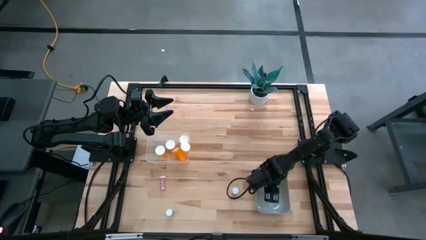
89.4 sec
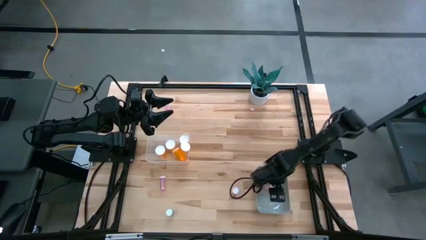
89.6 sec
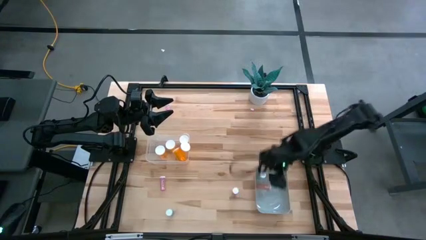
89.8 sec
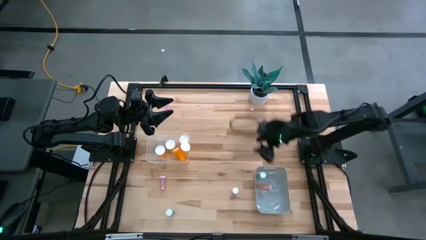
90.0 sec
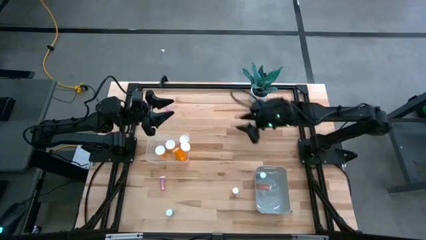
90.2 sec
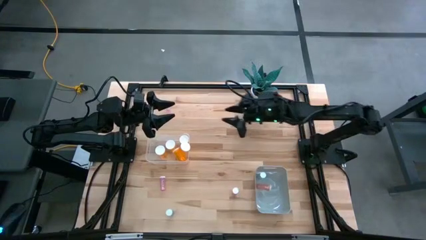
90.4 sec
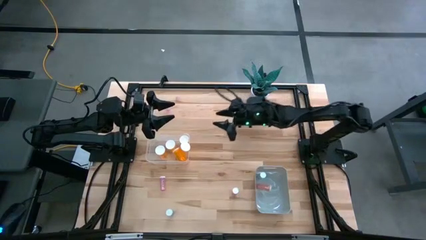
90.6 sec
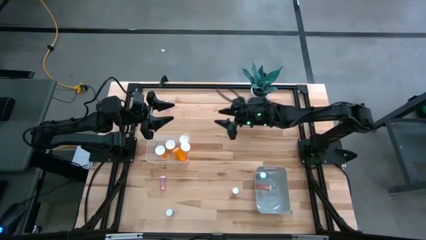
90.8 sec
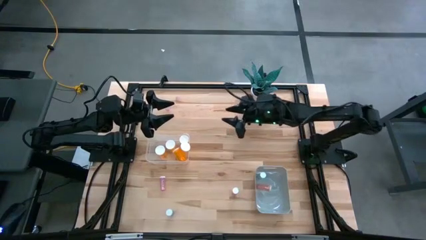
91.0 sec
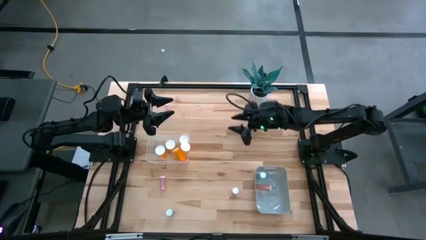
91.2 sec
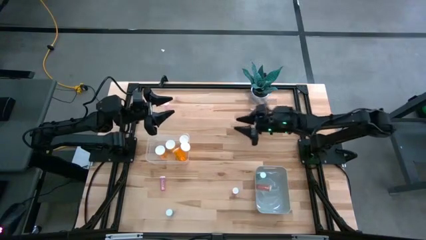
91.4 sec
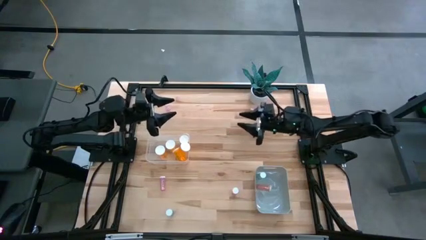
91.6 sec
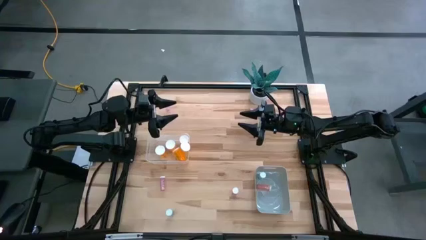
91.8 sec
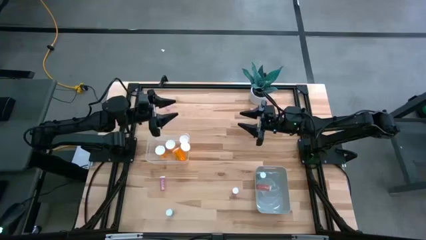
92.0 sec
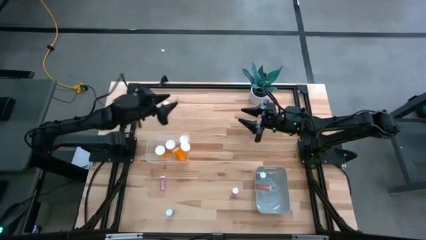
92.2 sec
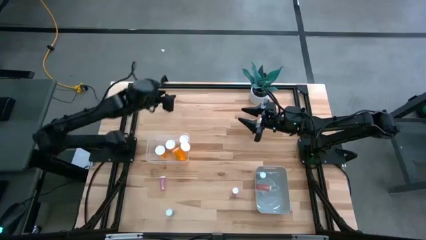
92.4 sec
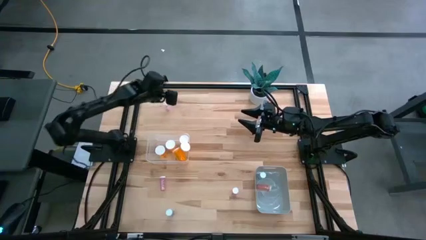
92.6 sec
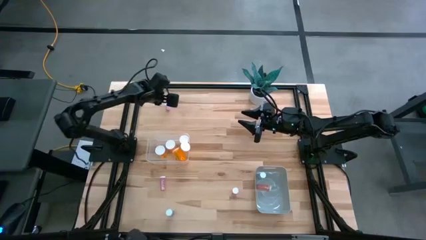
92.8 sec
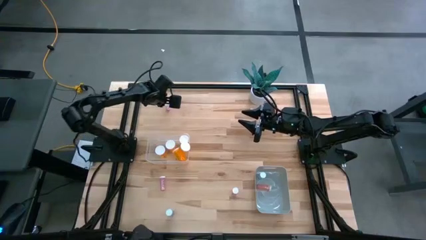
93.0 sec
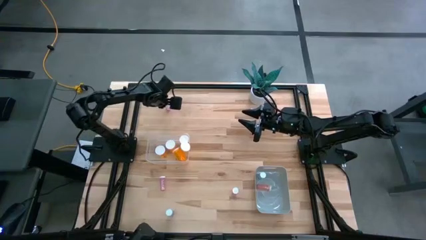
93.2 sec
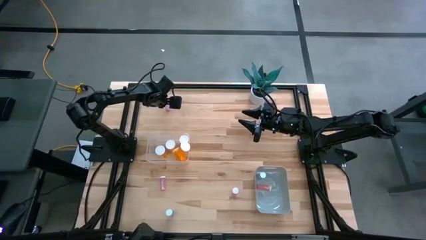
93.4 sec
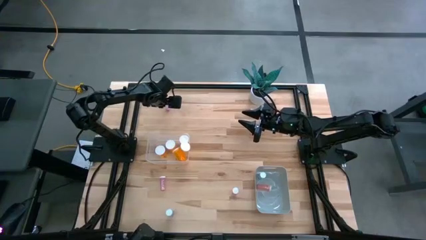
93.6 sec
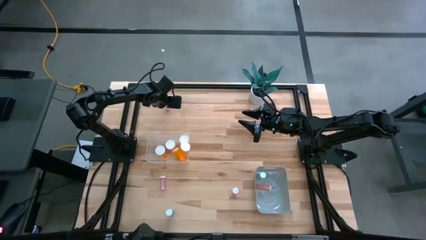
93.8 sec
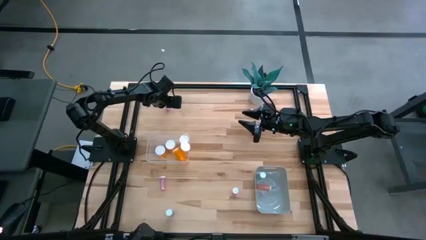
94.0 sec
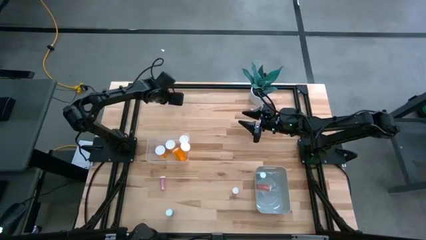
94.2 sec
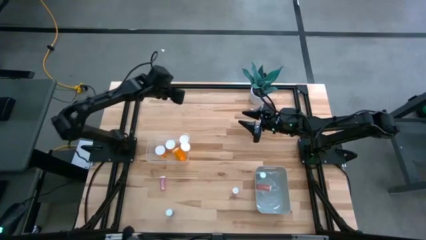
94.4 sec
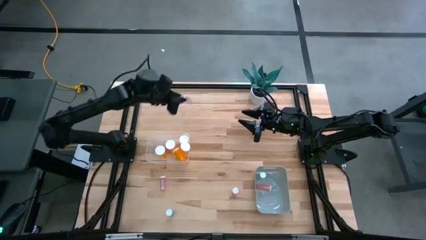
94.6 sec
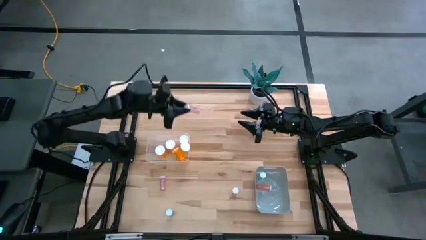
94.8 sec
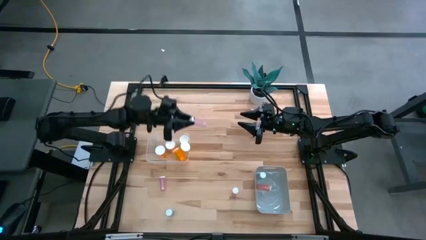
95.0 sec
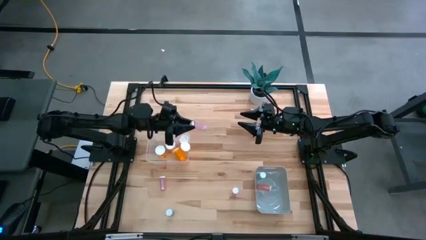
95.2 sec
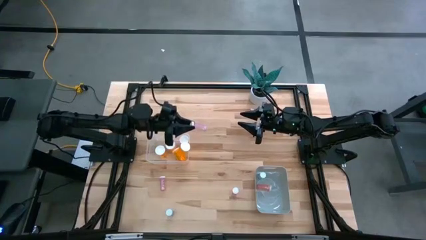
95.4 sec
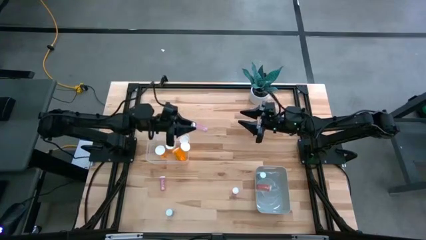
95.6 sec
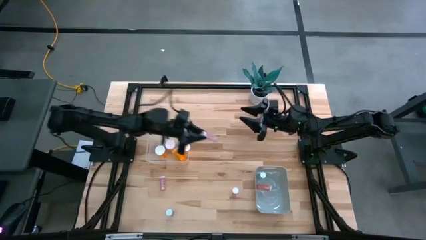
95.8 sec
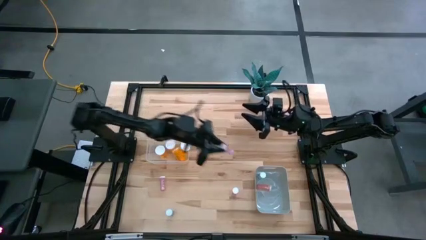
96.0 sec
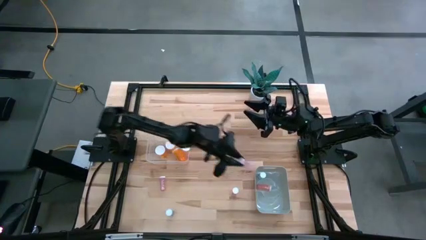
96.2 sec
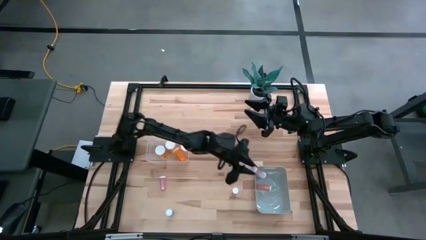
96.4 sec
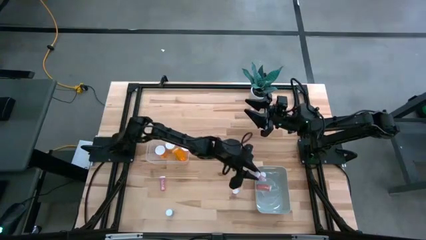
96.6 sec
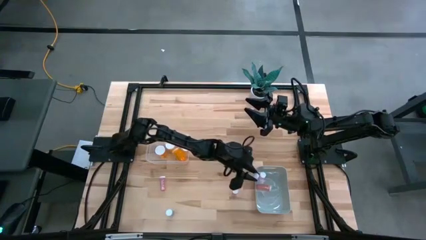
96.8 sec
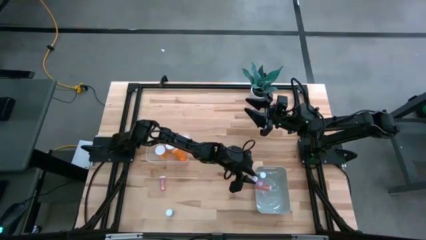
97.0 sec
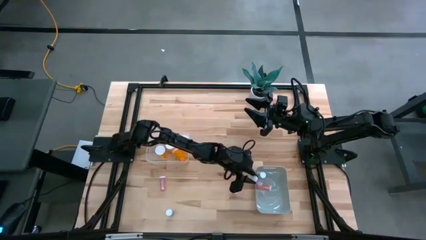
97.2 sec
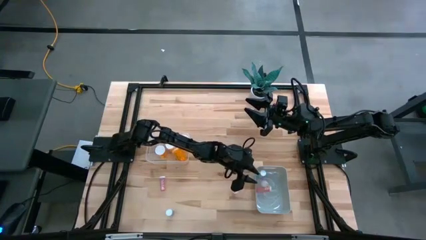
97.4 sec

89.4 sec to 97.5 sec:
Task: Pick and place medicine bottles into bin by pill shape (circle, oval)
Put the small pink pill bottle into the gray bin

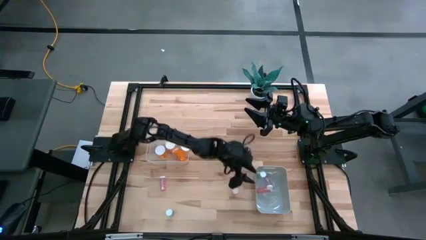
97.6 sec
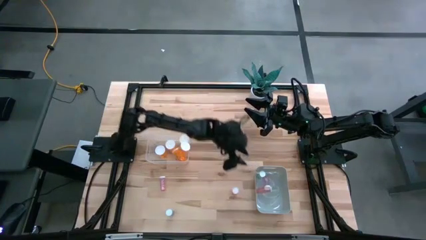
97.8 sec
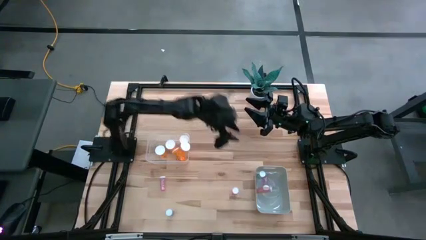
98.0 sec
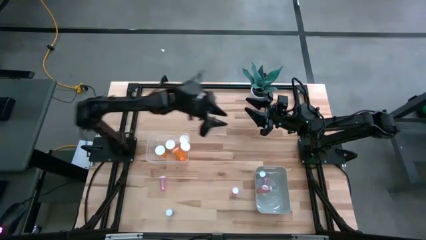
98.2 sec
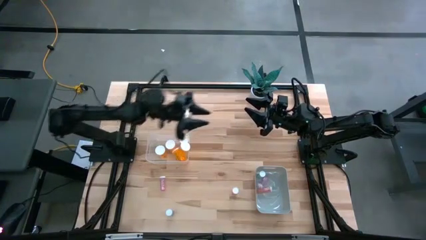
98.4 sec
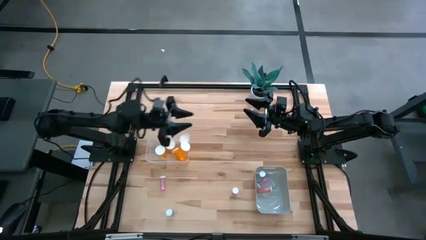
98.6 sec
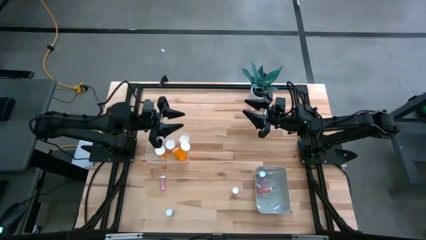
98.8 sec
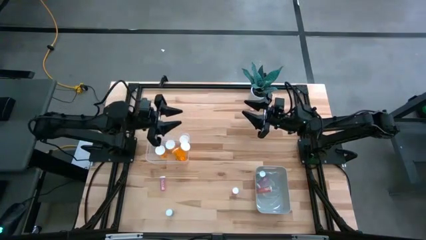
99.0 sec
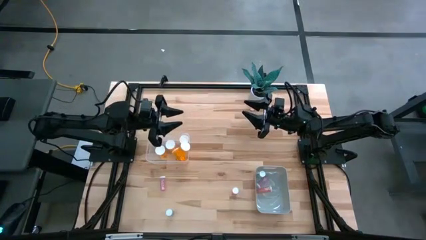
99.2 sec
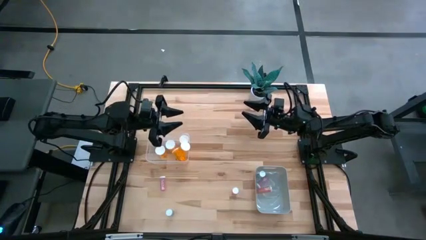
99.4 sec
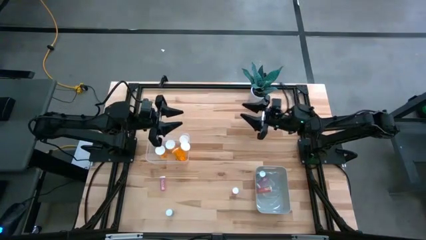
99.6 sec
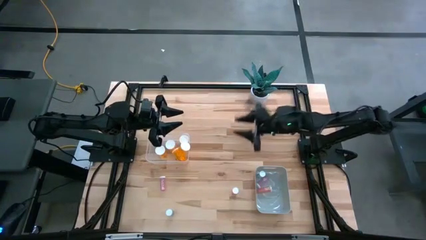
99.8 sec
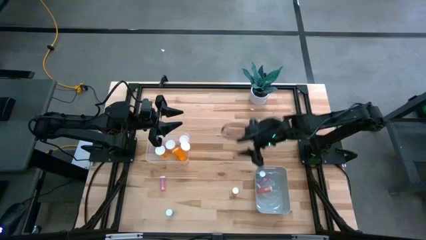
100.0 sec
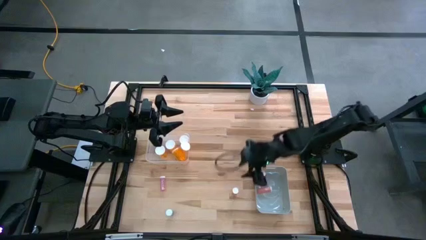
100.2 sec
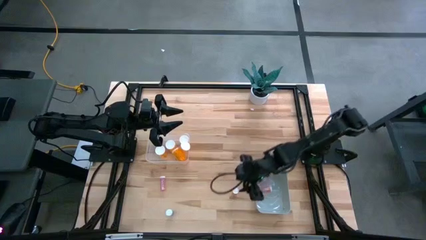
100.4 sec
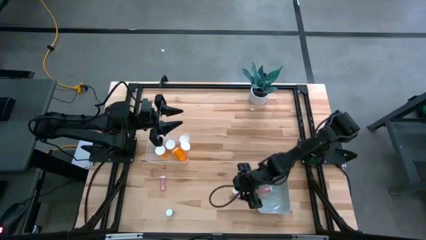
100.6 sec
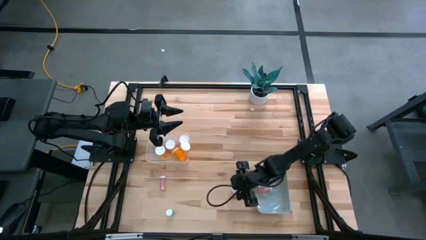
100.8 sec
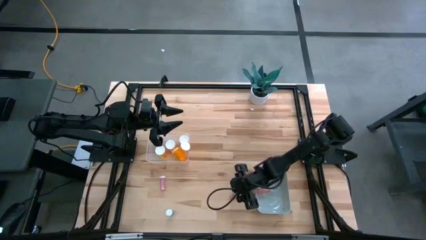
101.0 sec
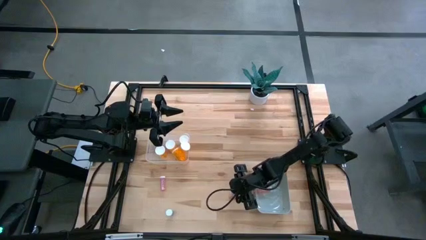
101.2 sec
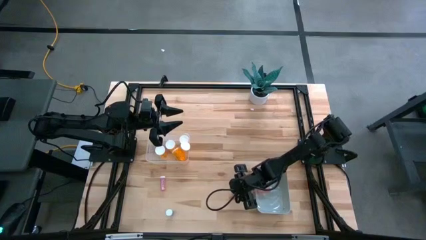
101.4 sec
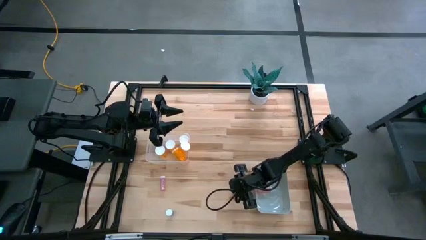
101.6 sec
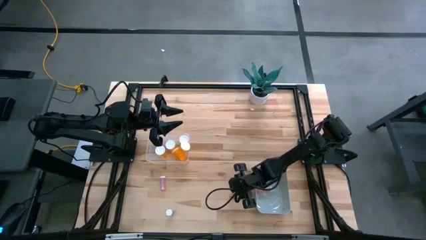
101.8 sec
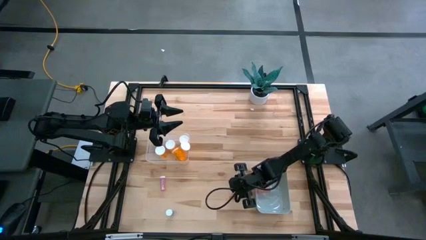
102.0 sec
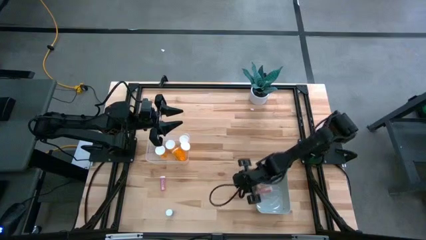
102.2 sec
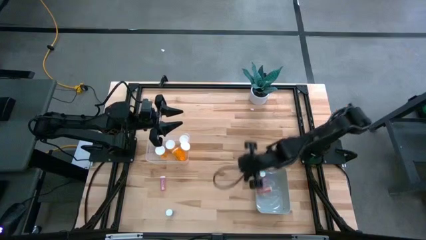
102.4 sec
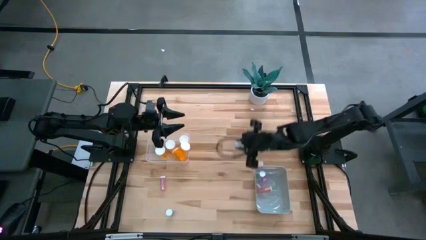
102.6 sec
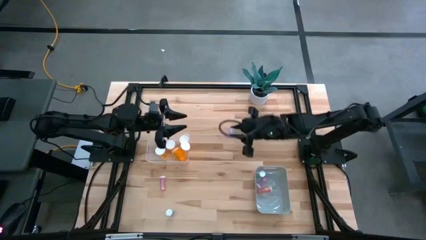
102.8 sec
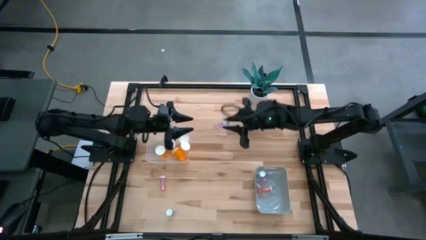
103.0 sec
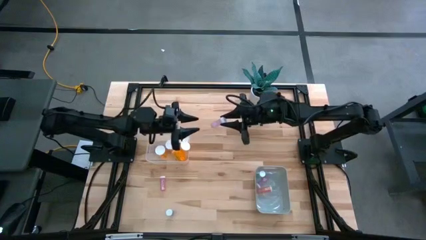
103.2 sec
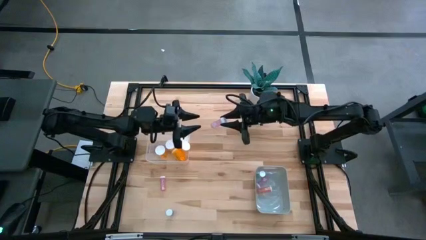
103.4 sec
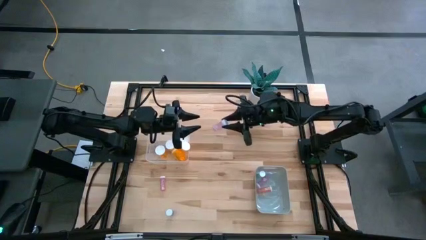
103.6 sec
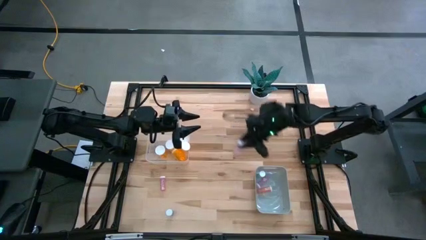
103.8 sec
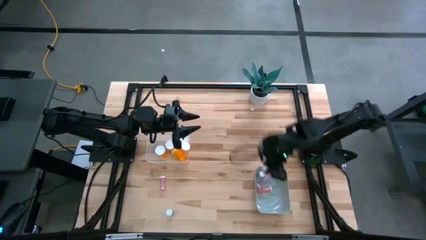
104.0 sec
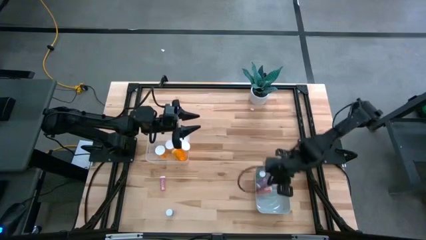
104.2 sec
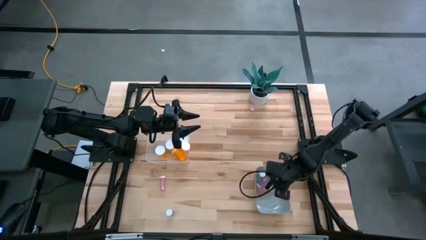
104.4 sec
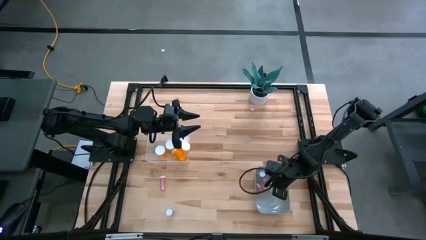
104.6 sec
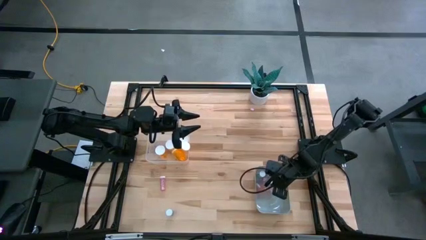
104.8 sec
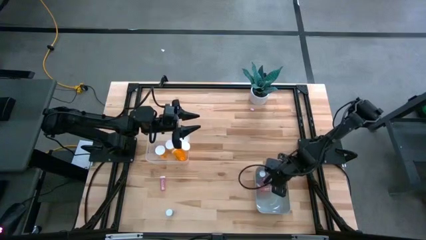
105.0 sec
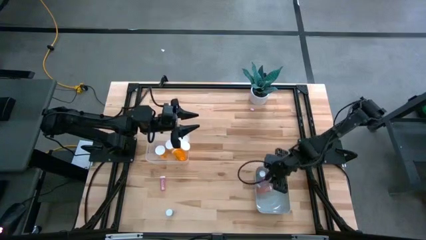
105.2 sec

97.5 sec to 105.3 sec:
Put the small pink pill bottle into the gray bin
